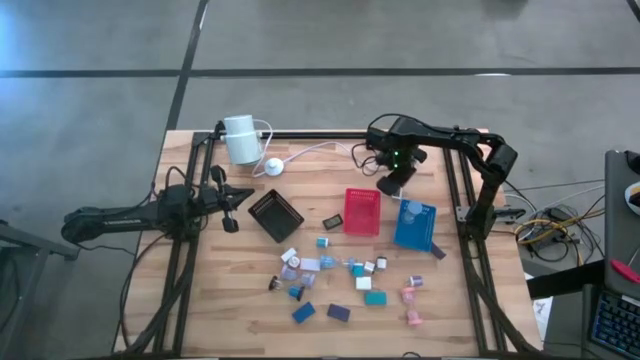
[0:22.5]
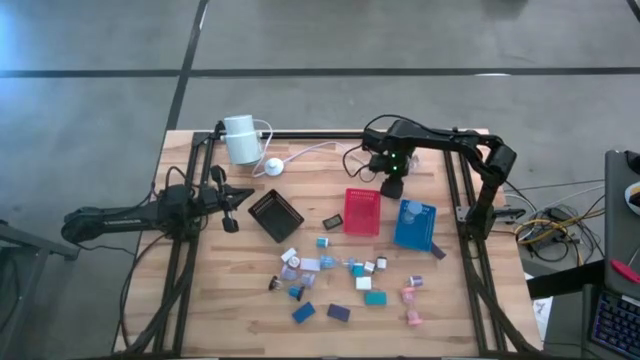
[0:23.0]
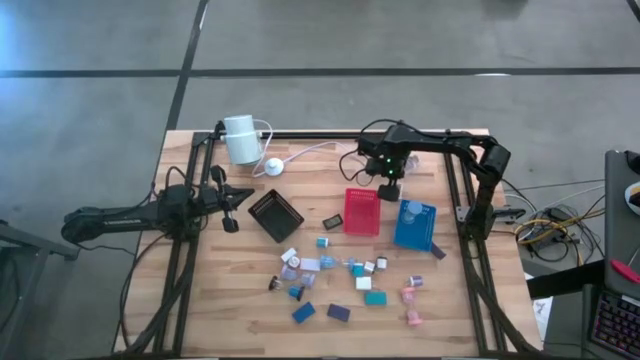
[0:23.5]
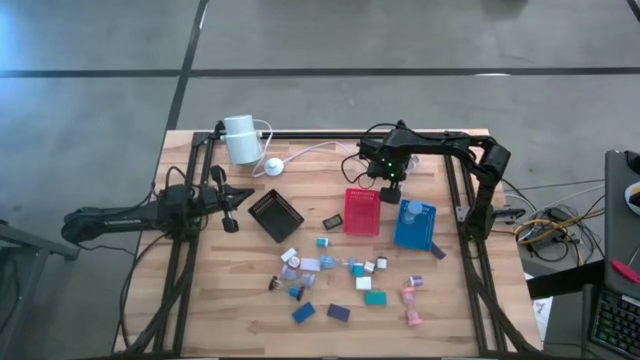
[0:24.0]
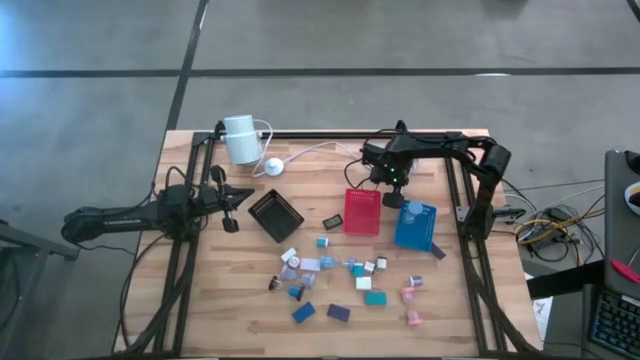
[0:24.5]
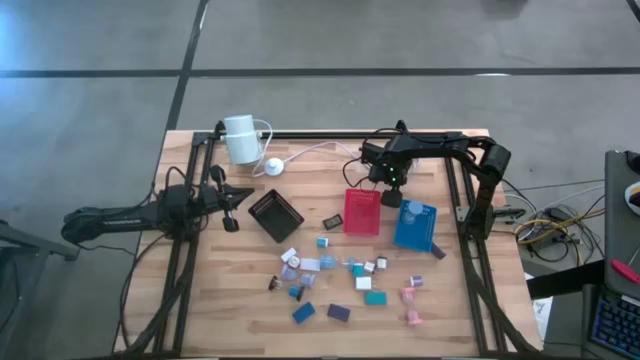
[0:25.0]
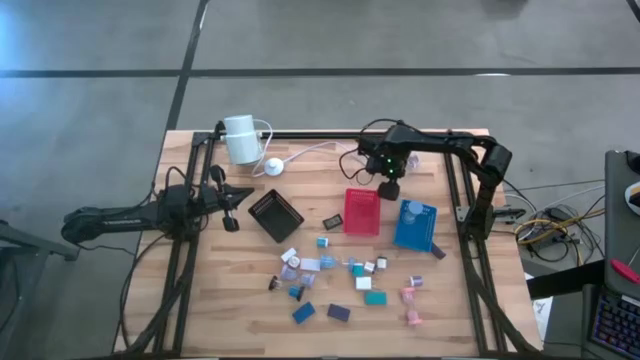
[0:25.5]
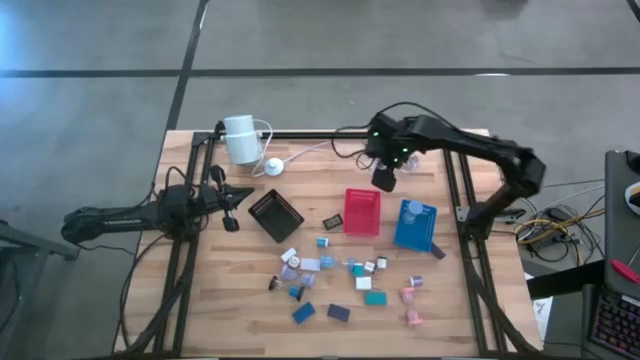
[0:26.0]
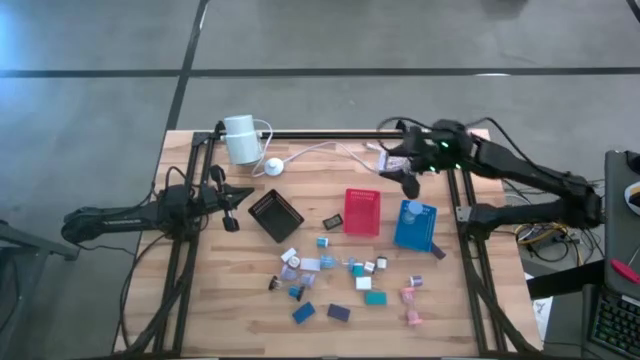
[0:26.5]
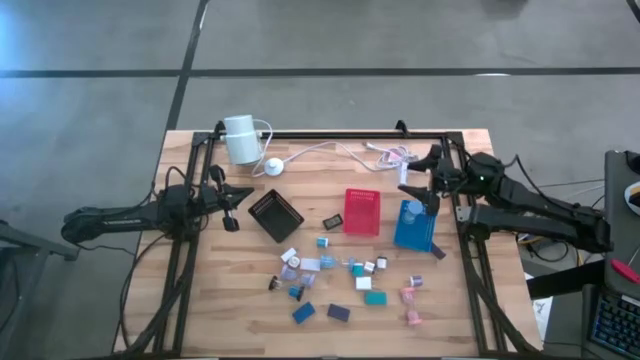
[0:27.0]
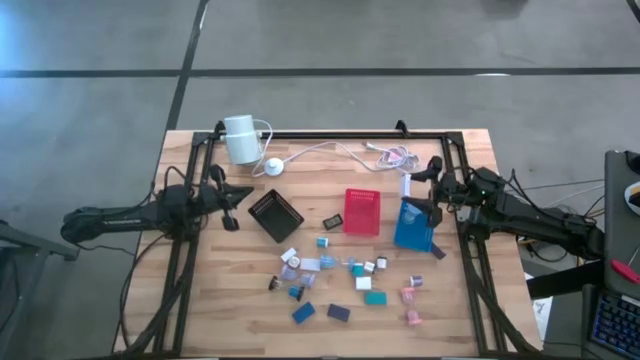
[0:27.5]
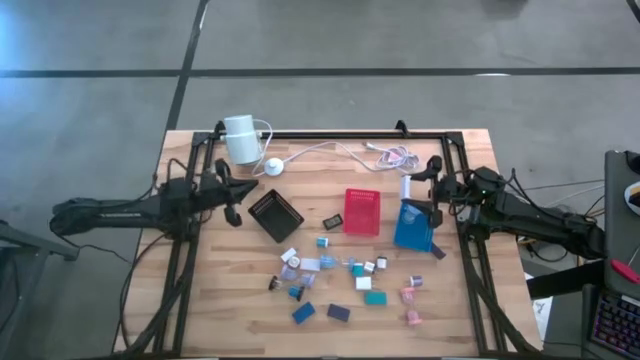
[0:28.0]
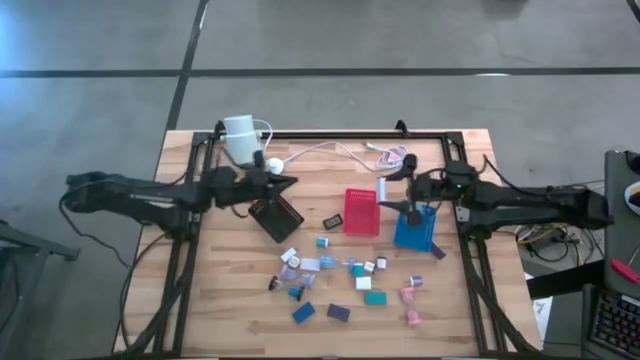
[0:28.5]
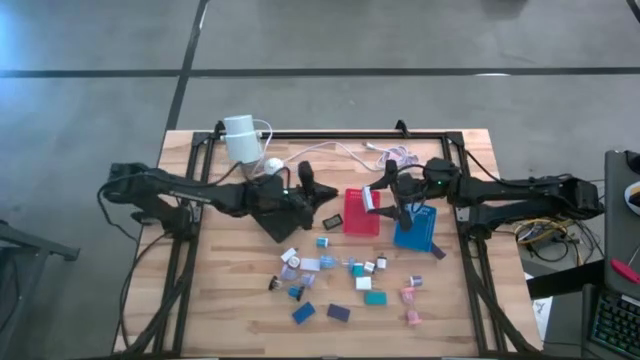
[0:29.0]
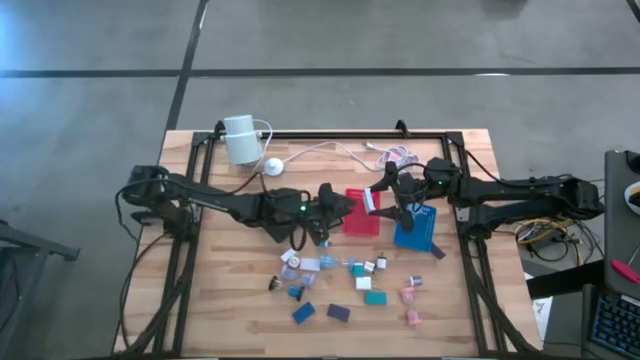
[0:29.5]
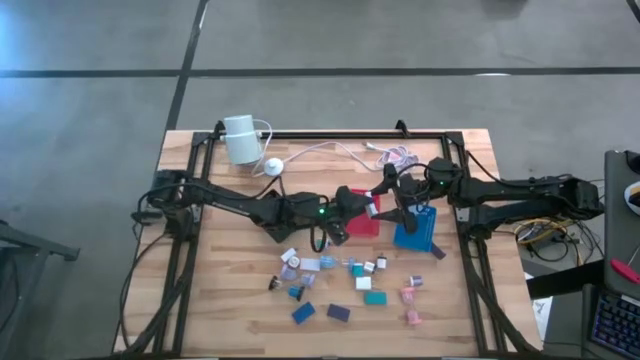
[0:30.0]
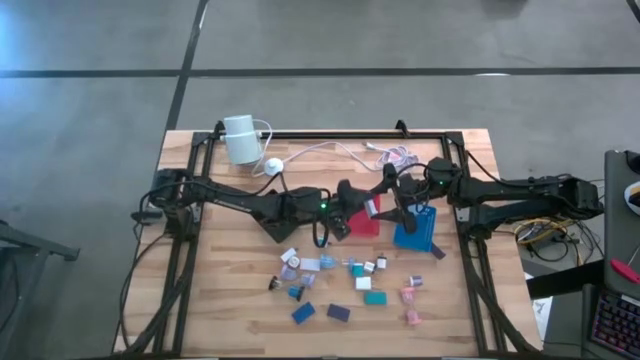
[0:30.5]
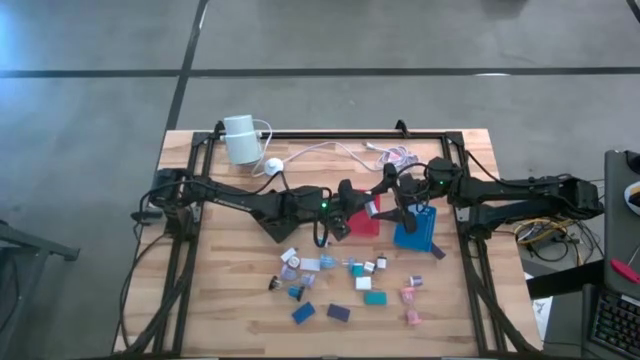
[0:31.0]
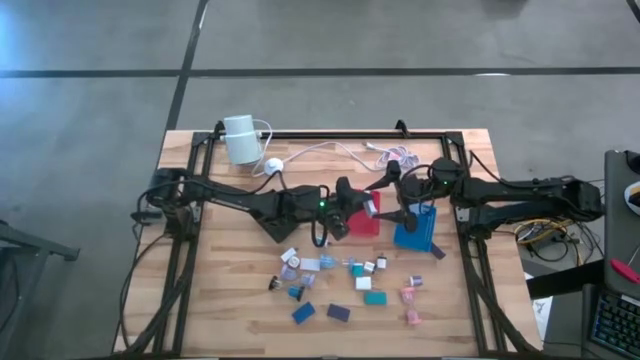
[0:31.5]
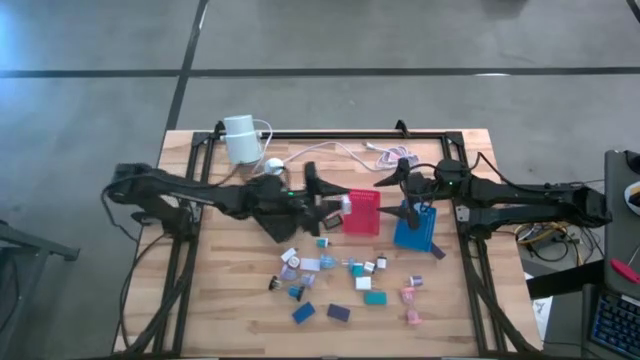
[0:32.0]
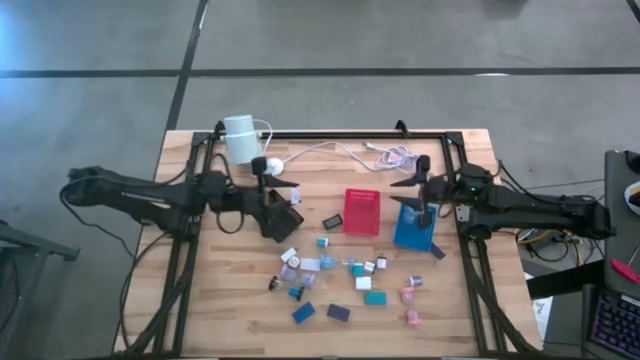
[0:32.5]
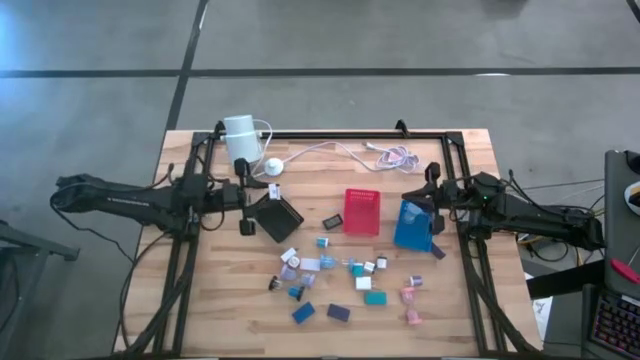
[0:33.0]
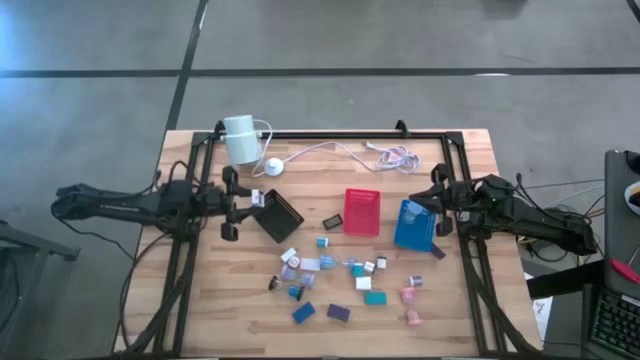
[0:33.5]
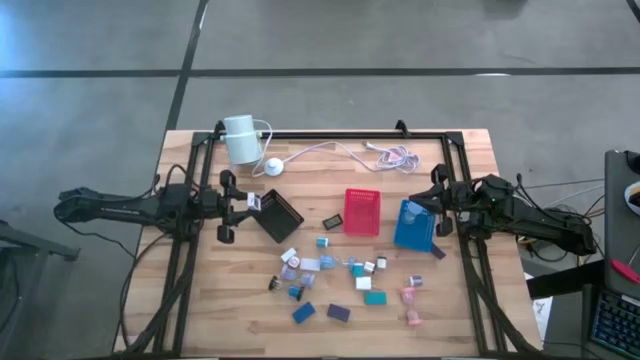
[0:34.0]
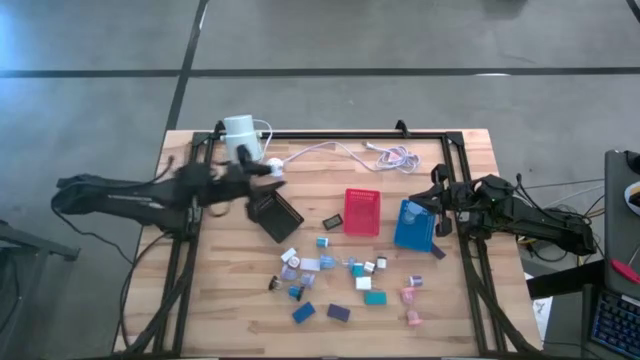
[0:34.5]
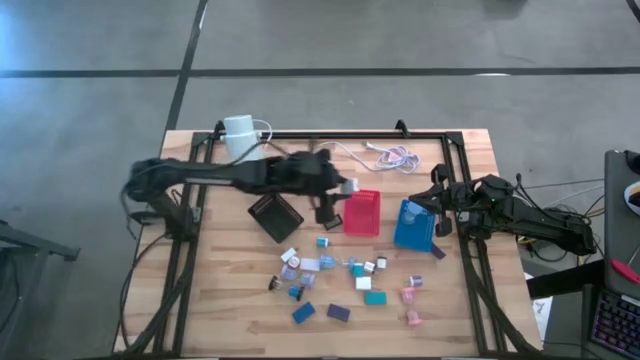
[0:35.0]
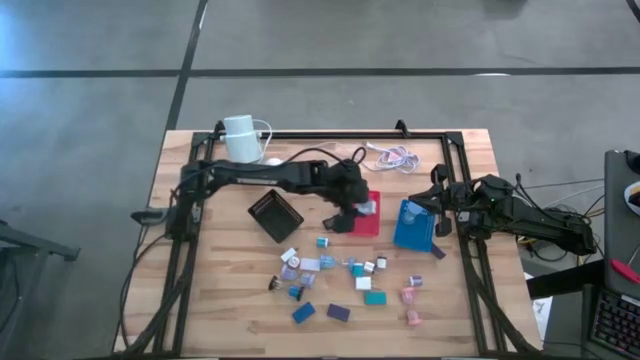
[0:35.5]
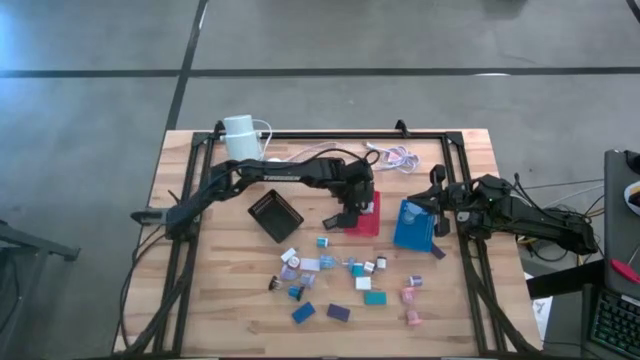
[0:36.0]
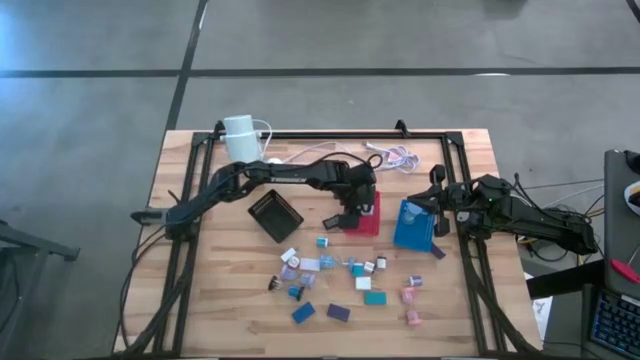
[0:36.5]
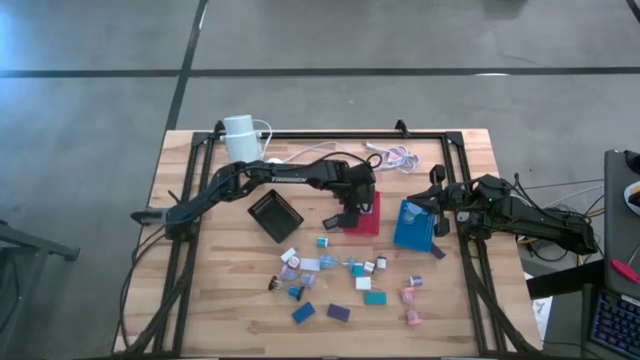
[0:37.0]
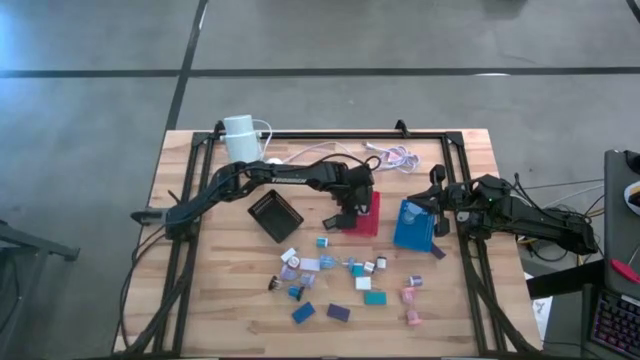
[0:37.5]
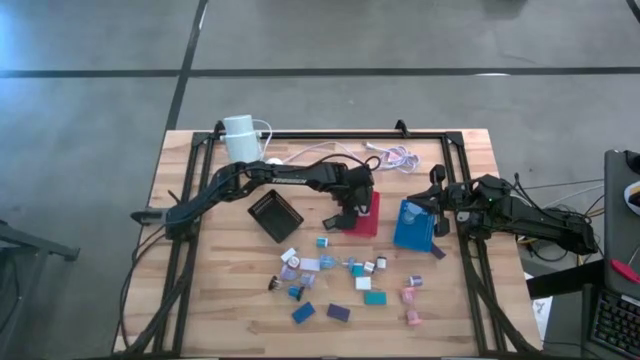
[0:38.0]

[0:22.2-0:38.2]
Task: Pick & Place Office items
Put the top white digital clock into the red bin
